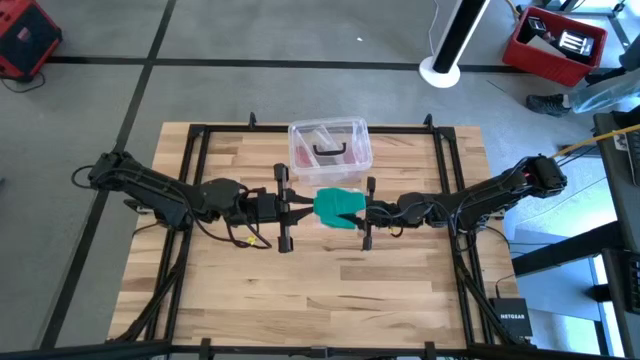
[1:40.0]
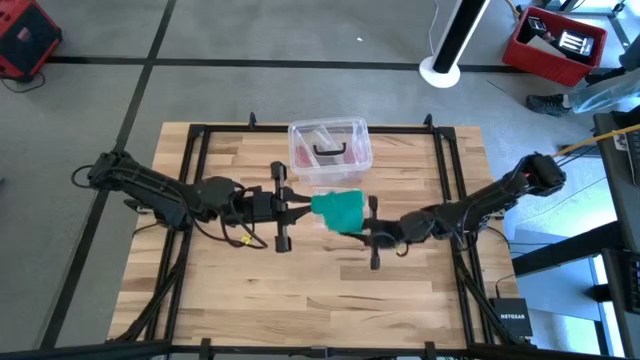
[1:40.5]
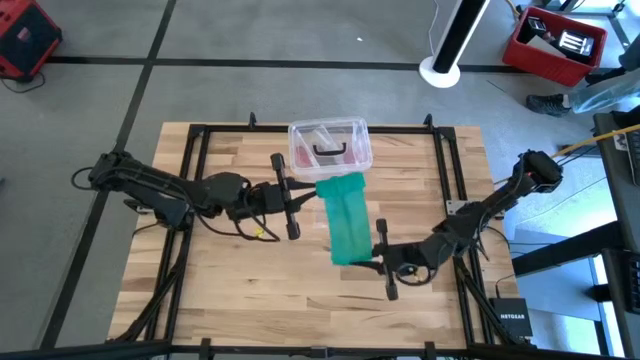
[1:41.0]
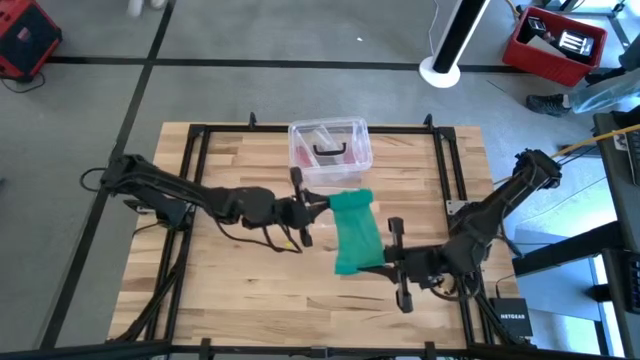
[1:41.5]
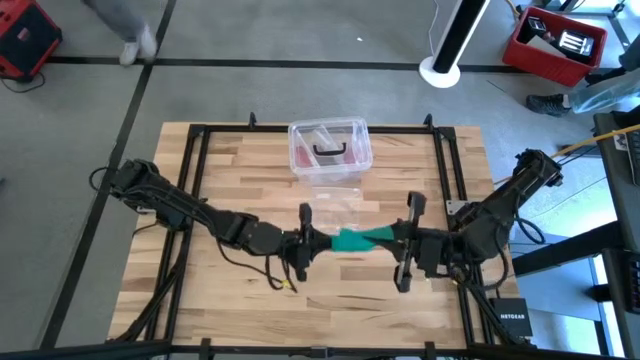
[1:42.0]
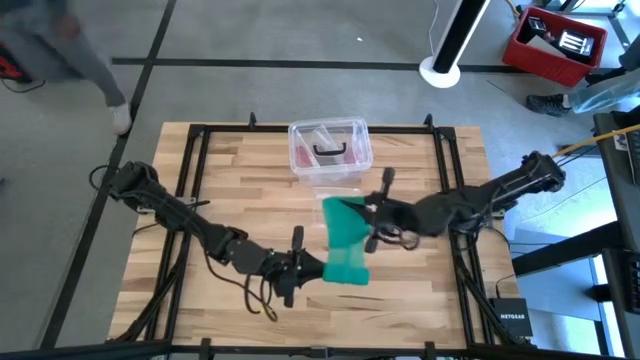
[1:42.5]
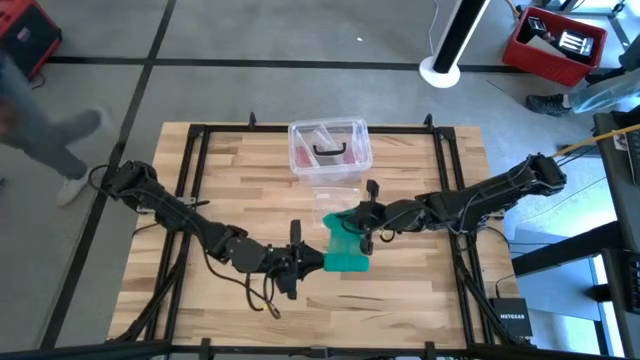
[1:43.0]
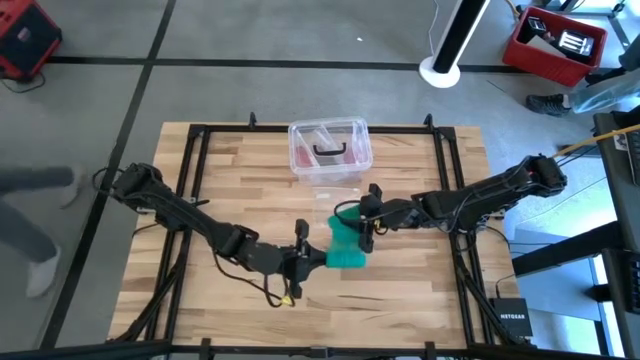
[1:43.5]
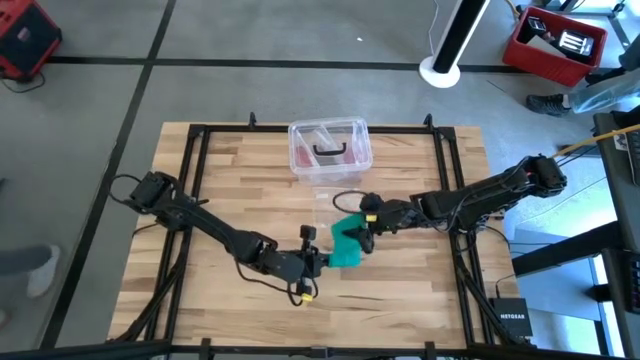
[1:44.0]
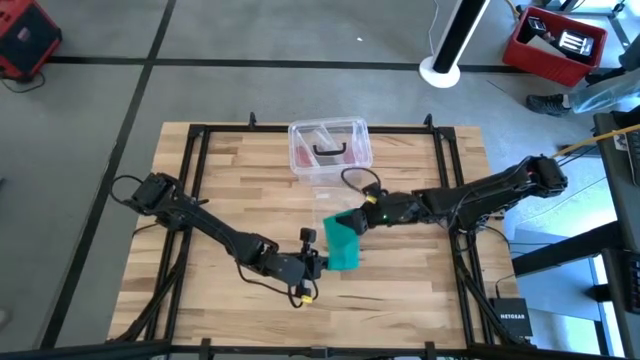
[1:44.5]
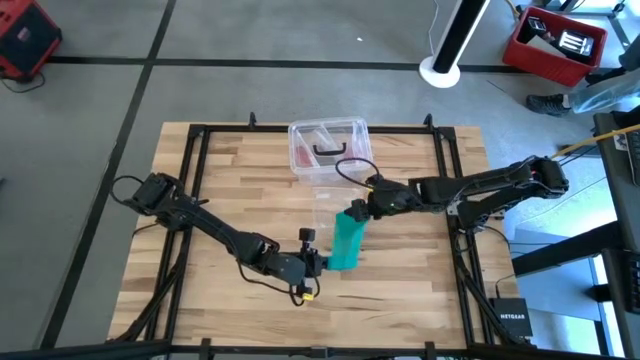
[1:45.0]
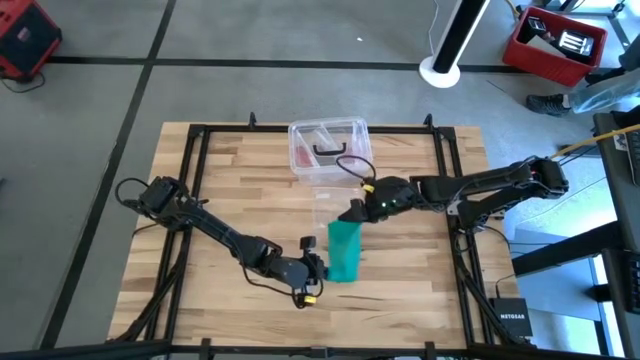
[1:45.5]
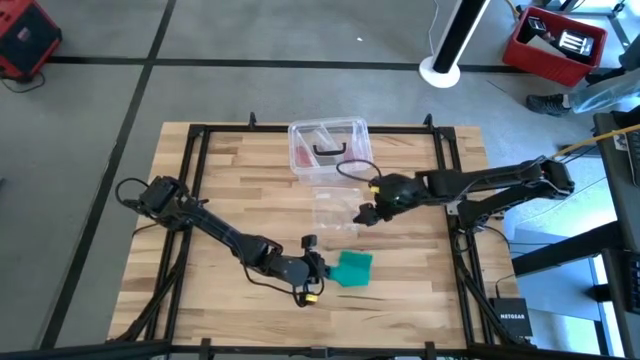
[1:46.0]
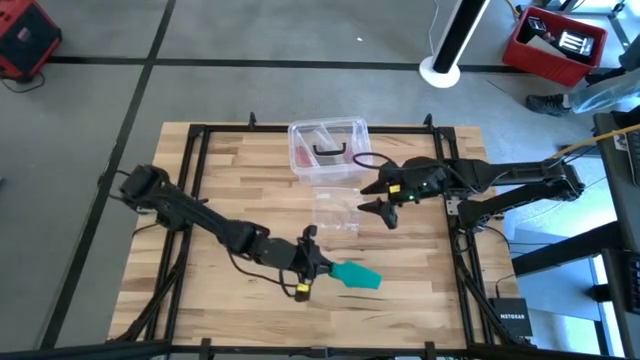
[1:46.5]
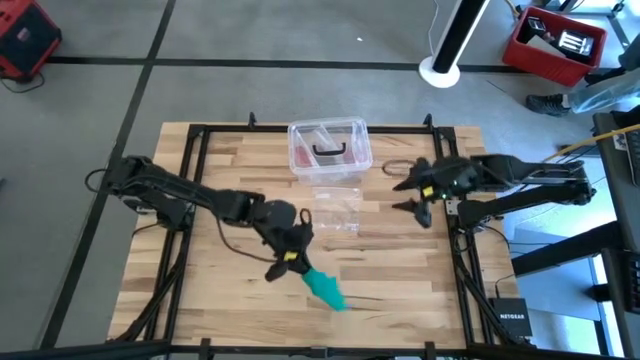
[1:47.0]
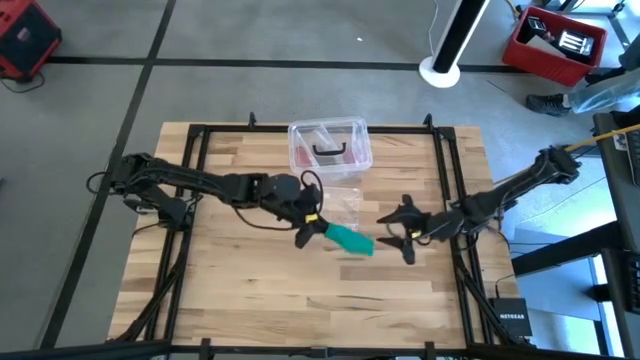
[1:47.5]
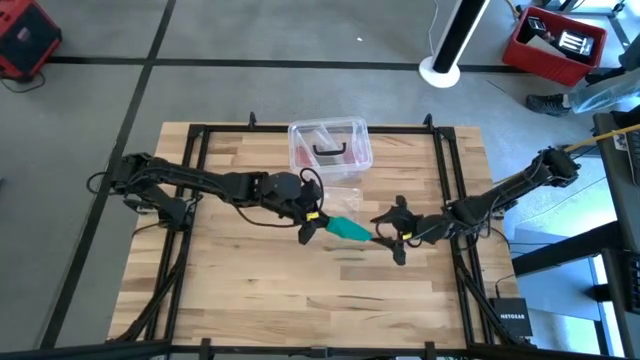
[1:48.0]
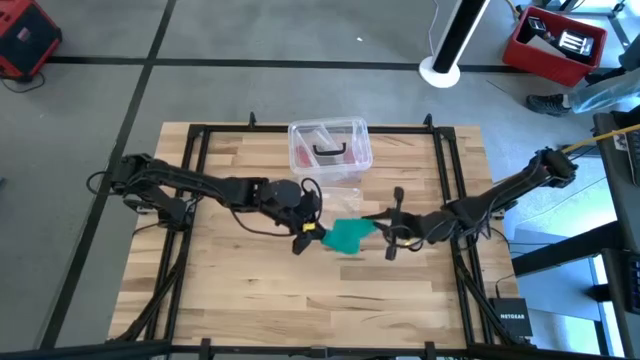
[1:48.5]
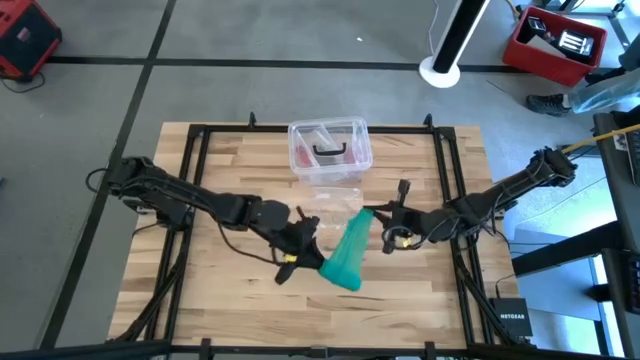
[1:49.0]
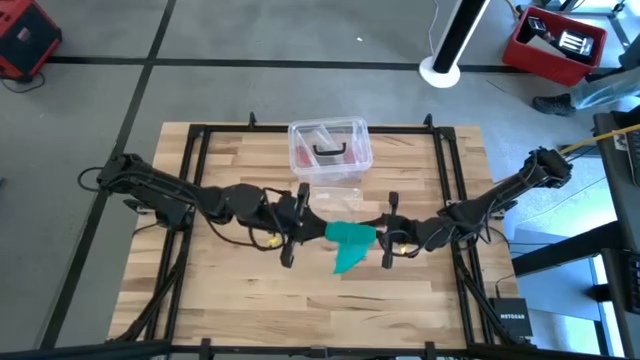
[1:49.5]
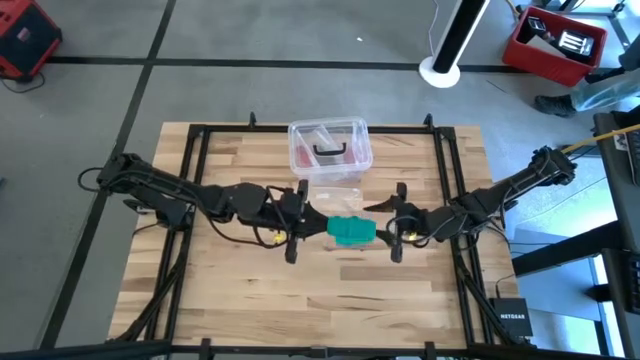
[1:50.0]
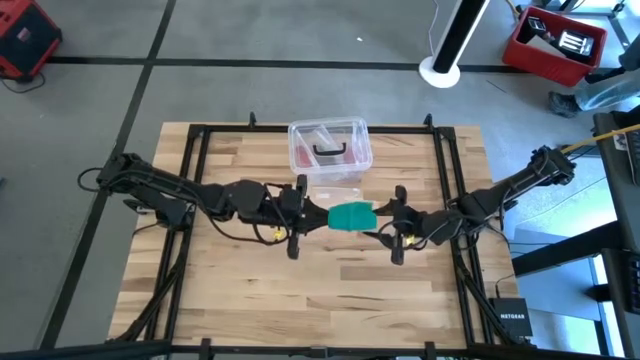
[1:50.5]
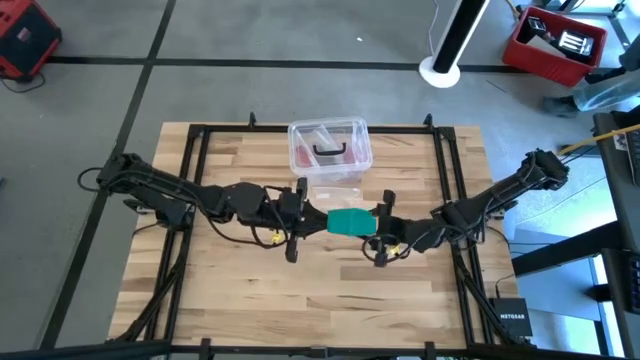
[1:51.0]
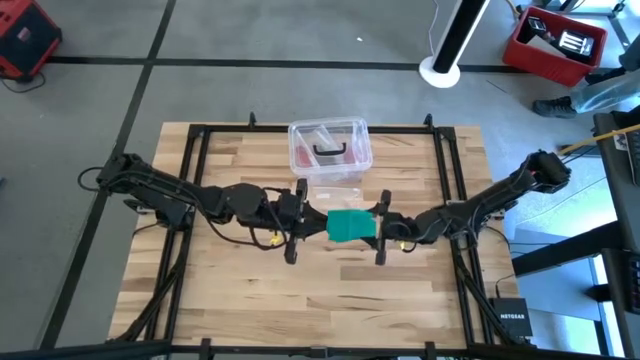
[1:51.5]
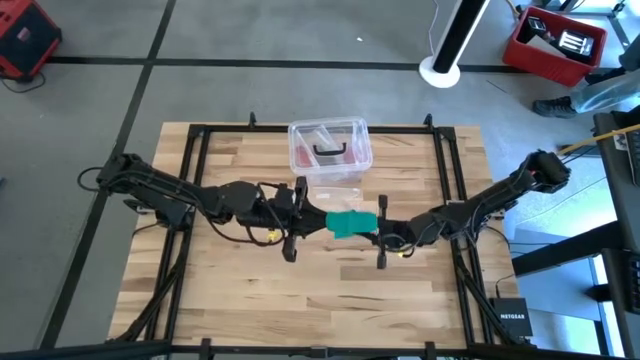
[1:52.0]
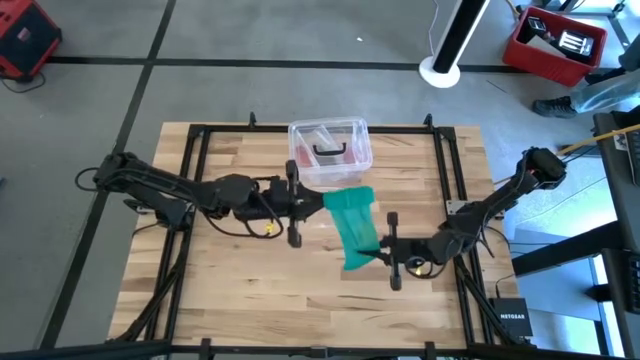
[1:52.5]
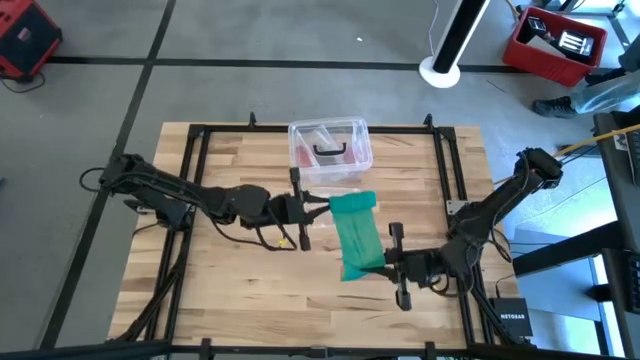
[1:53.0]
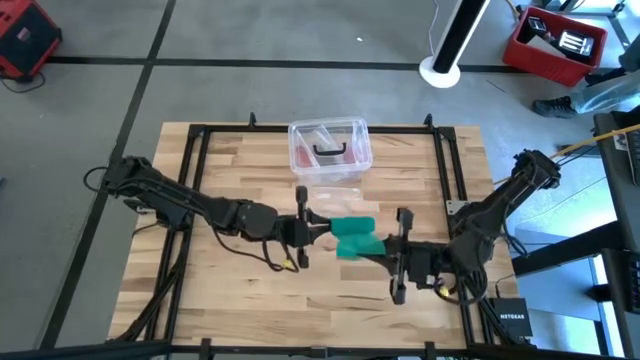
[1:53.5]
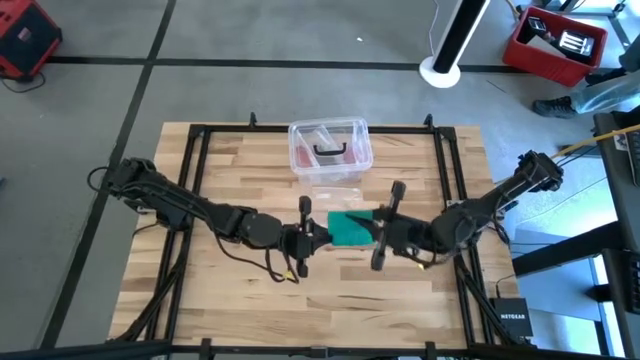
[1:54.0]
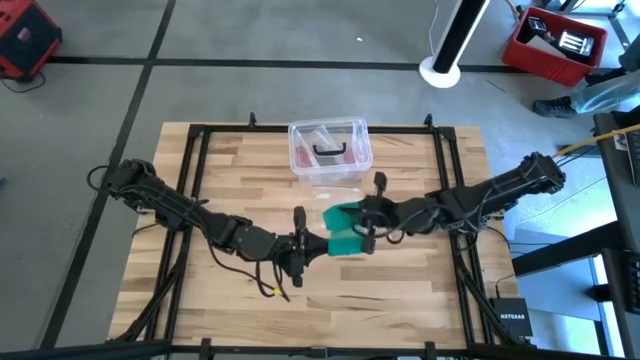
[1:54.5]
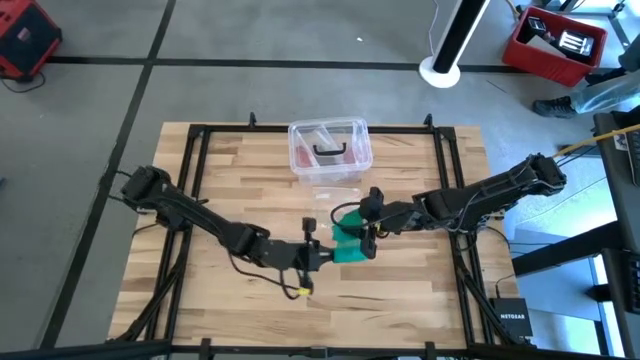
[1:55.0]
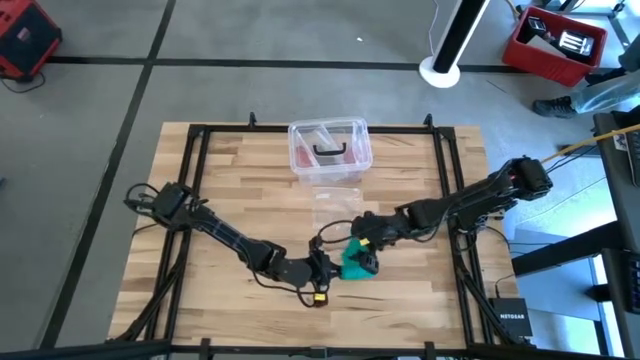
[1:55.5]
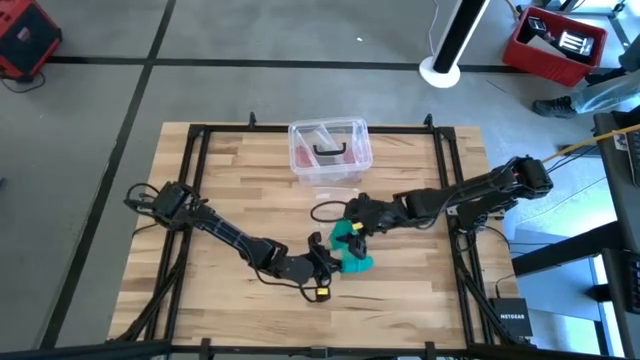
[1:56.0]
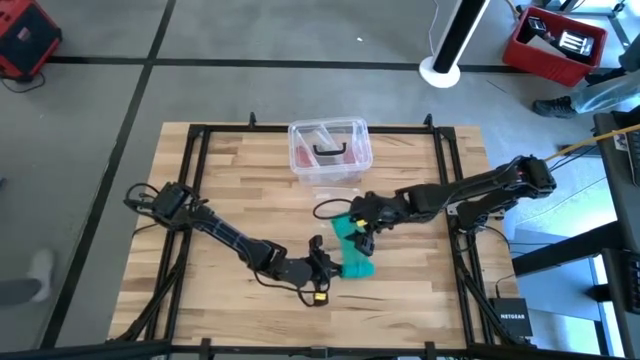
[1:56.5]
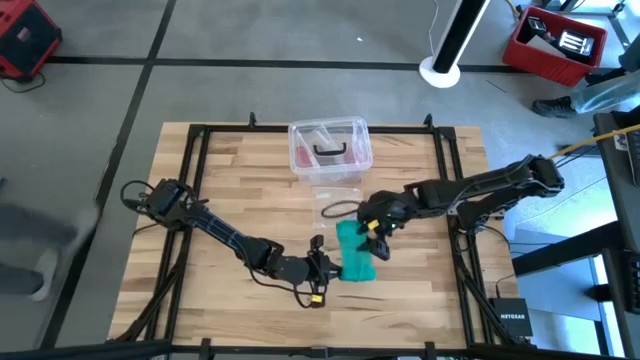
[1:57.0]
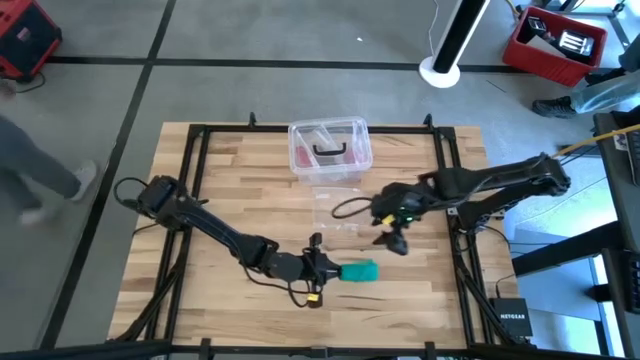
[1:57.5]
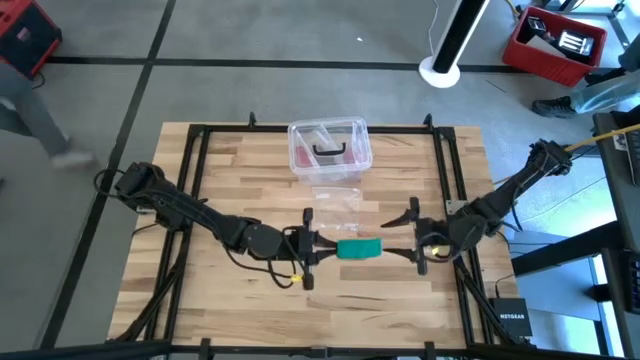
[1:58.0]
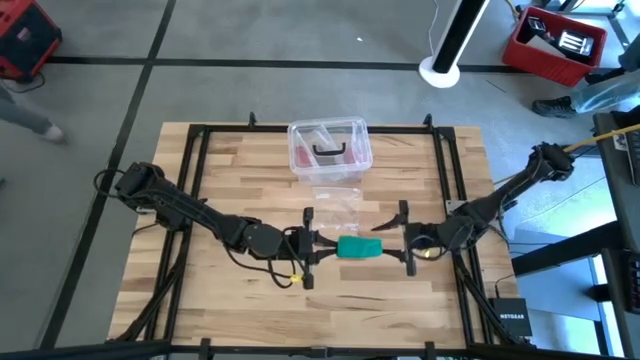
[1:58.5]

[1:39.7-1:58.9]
Task: Roll bandage
Roll the green bandage

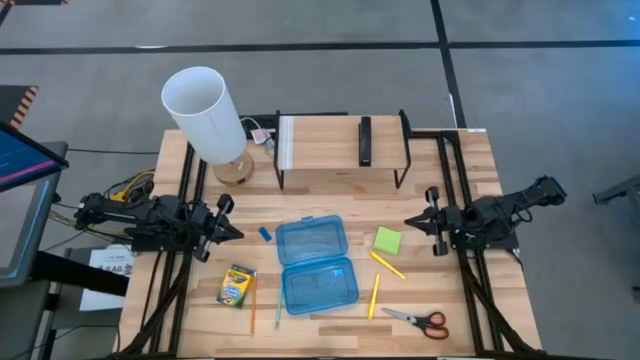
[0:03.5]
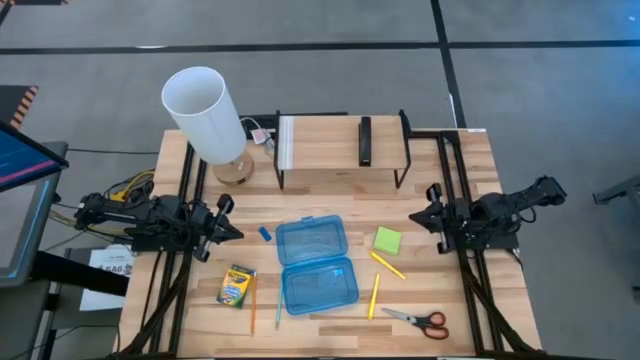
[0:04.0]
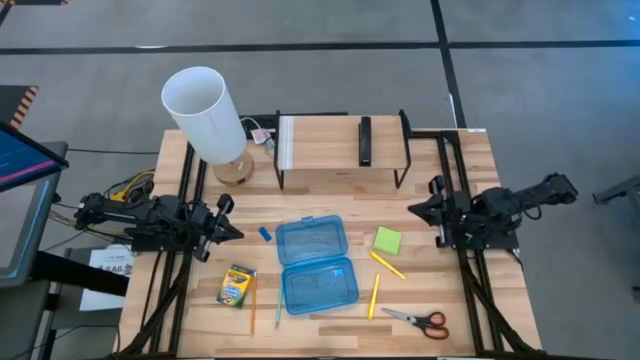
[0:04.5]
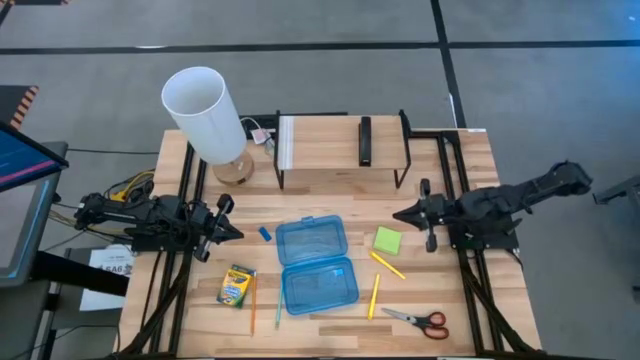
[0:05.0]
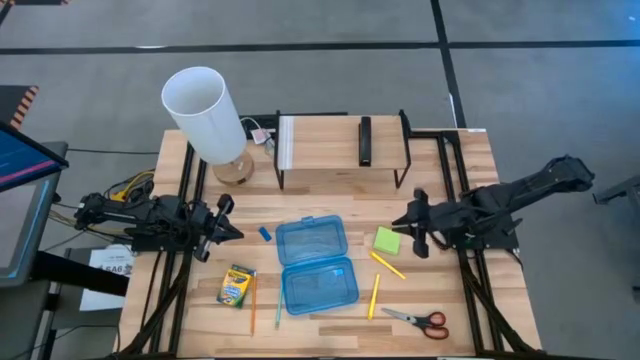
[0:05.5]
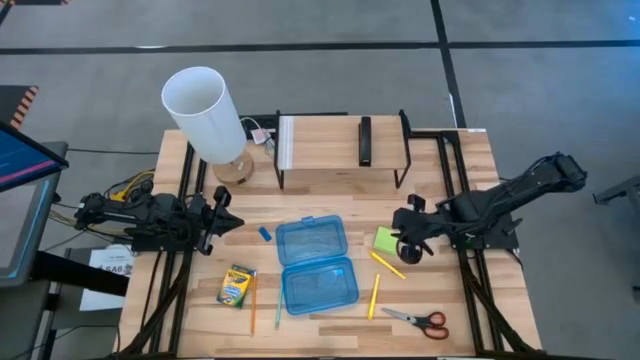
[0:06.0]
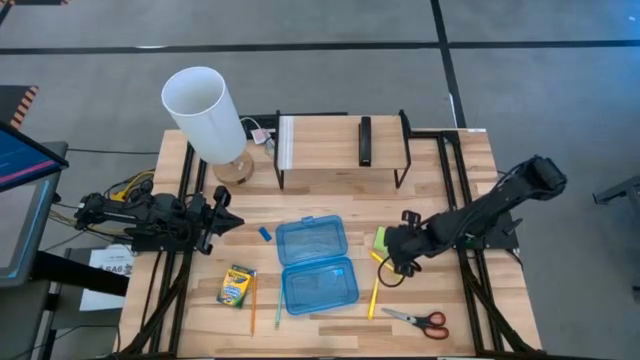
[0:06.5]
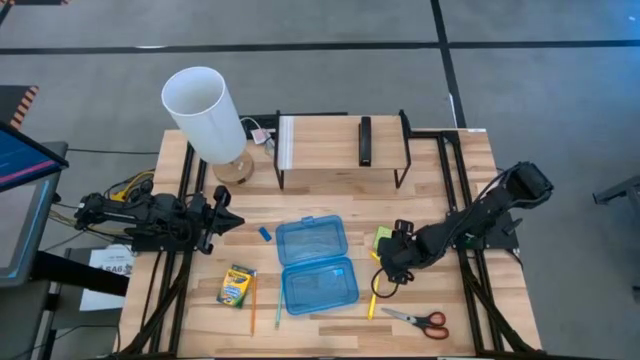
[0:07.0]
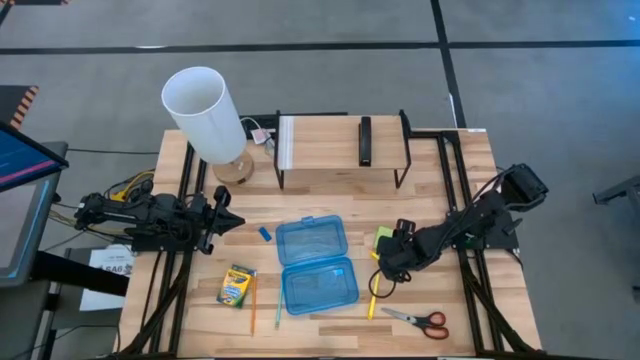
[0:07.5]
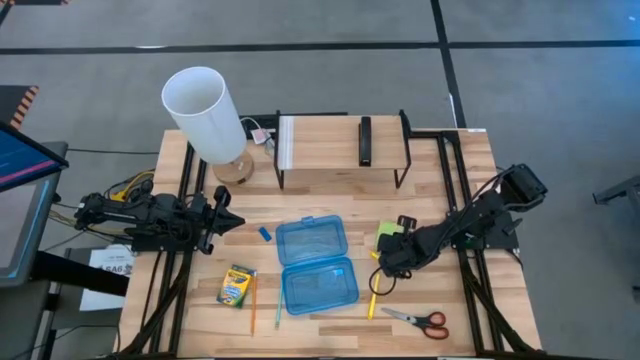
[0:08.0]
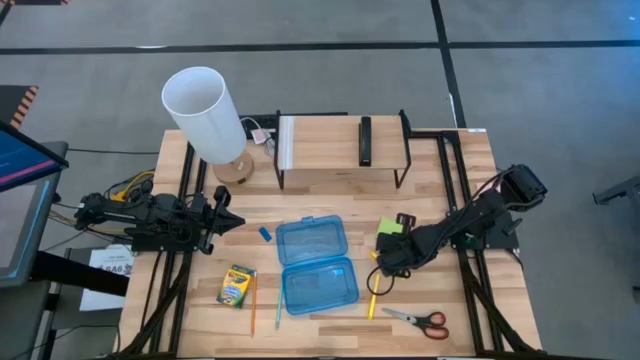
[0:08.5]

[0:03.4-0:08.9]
Task: Pack school essentials
Put the sticky notes into the blue supply box
